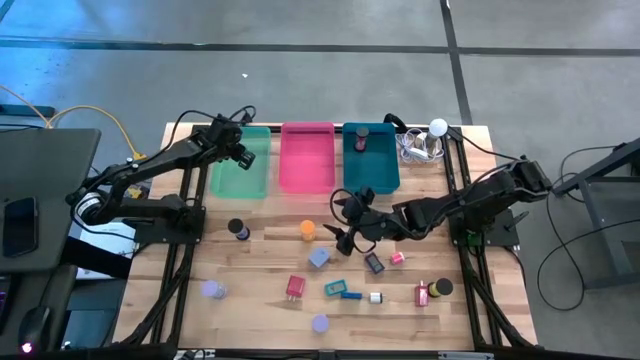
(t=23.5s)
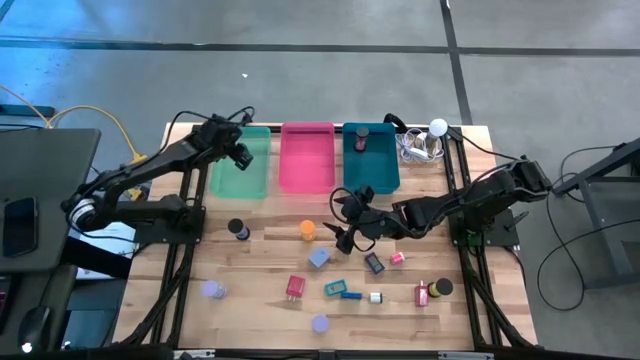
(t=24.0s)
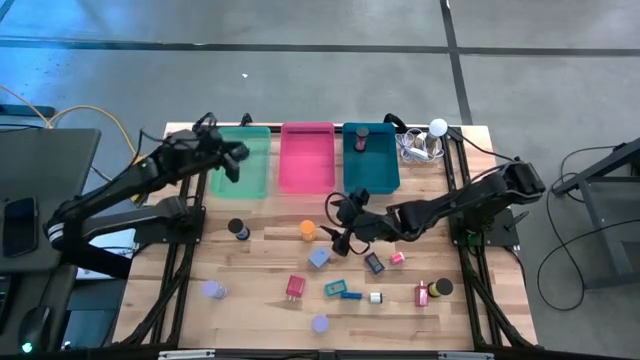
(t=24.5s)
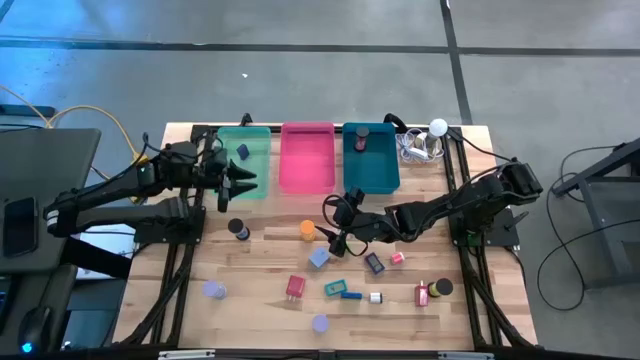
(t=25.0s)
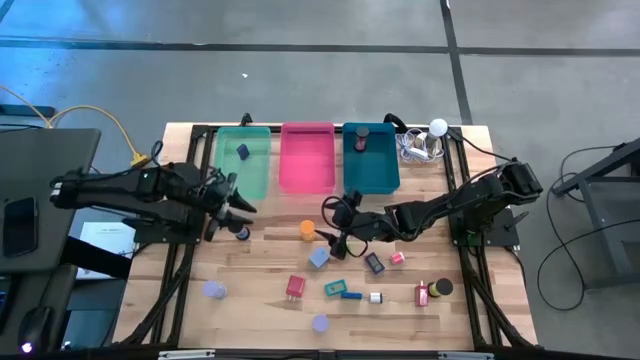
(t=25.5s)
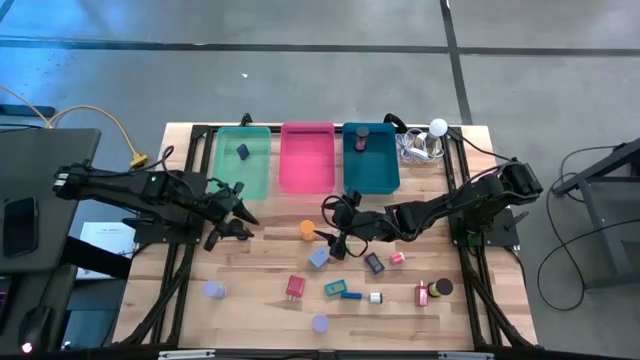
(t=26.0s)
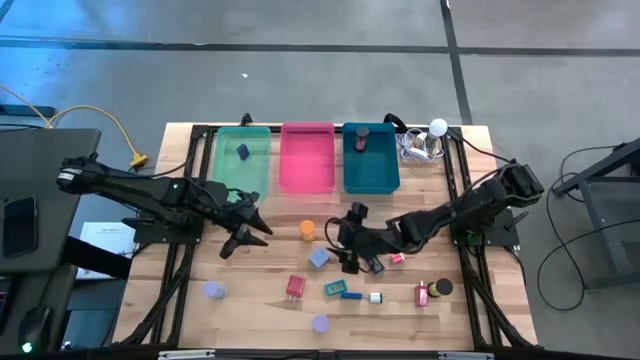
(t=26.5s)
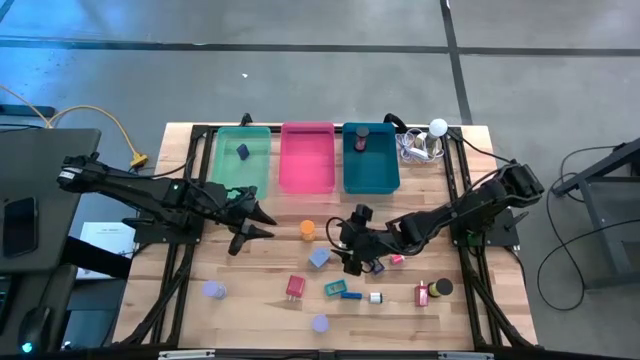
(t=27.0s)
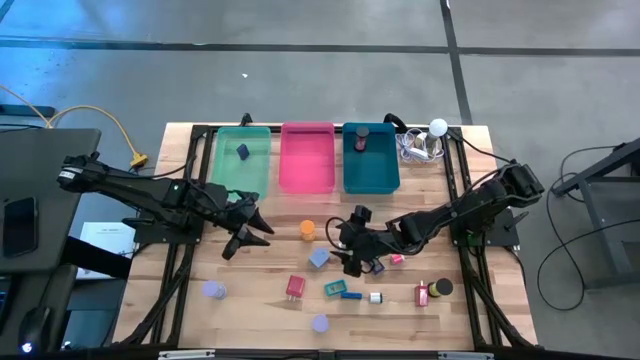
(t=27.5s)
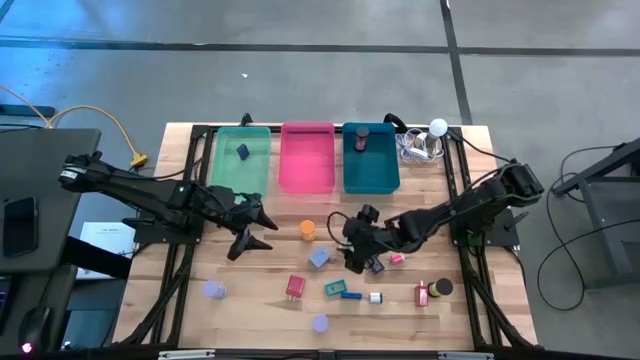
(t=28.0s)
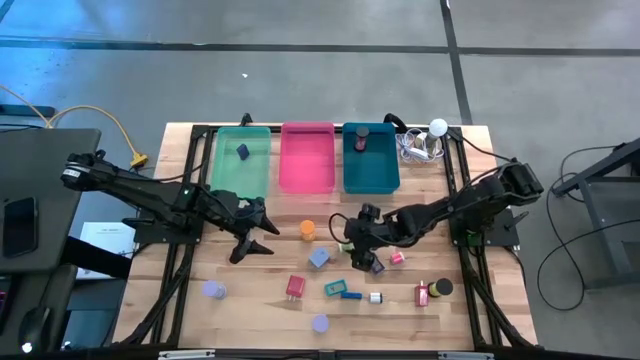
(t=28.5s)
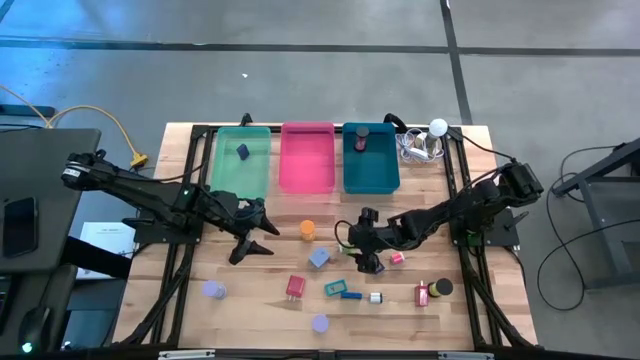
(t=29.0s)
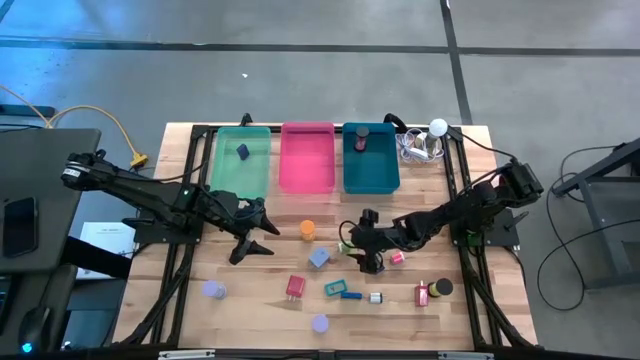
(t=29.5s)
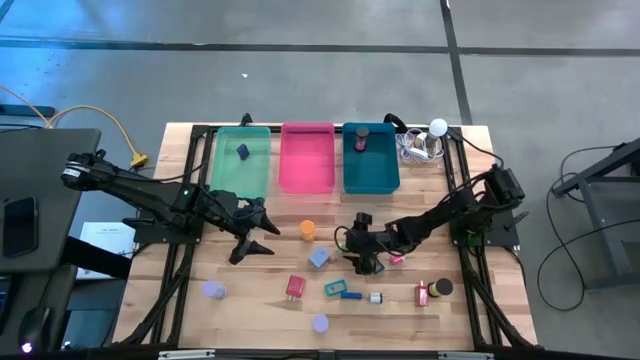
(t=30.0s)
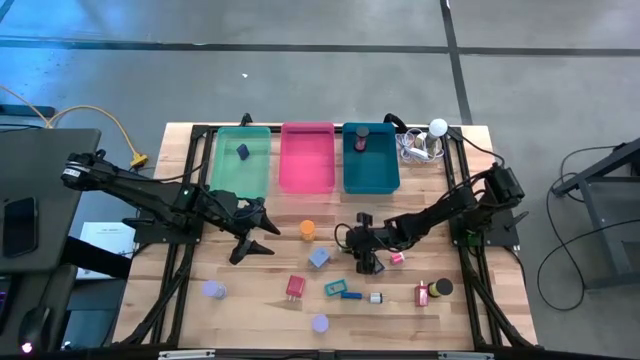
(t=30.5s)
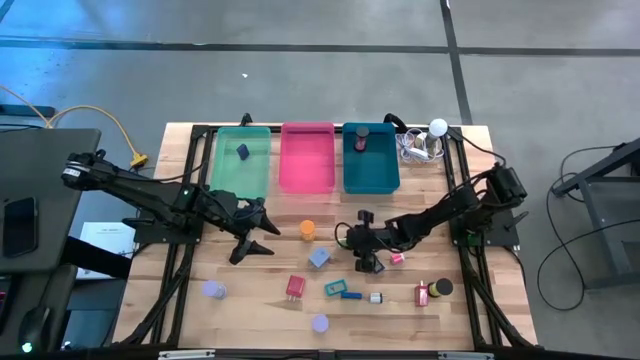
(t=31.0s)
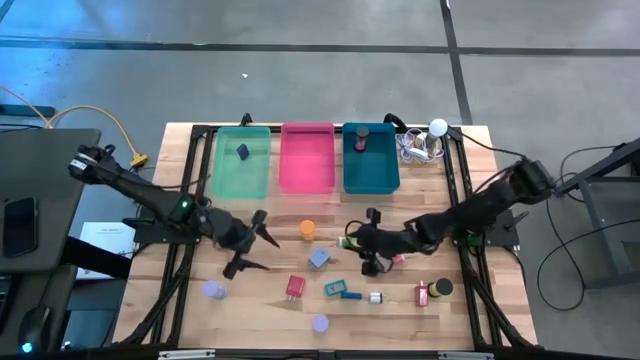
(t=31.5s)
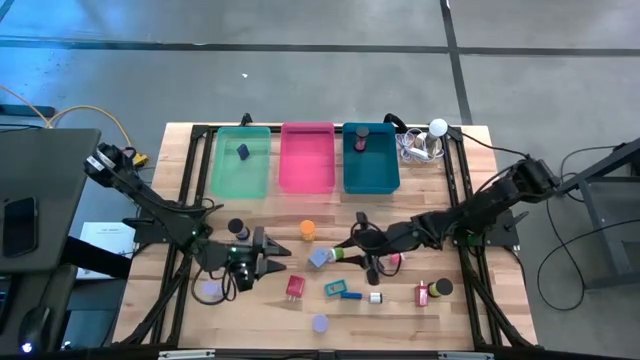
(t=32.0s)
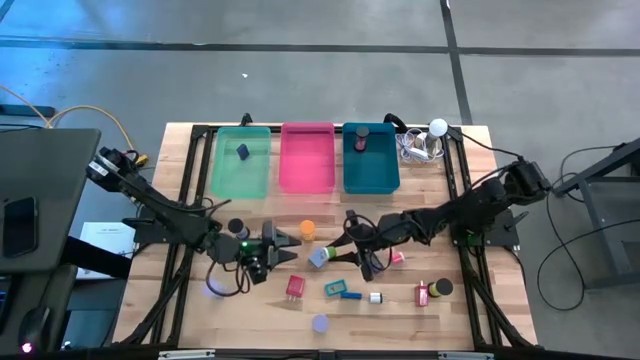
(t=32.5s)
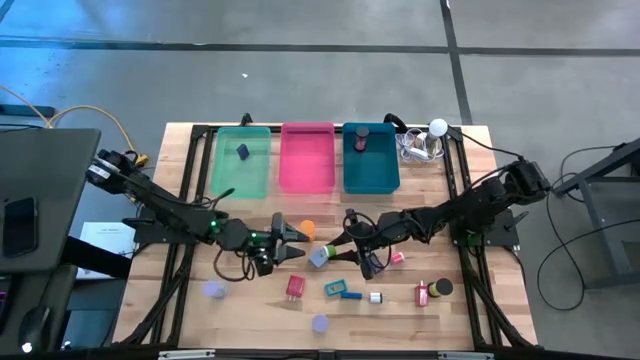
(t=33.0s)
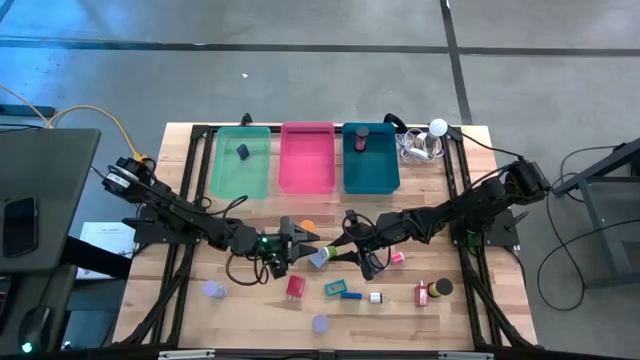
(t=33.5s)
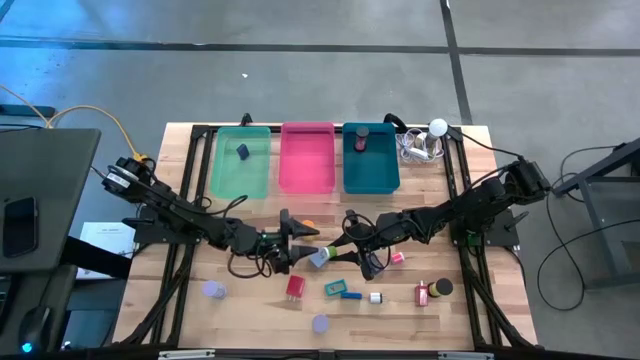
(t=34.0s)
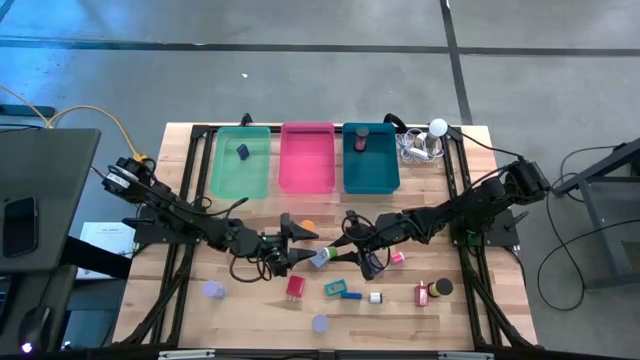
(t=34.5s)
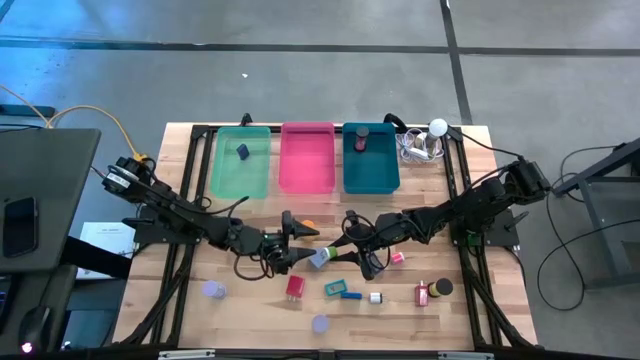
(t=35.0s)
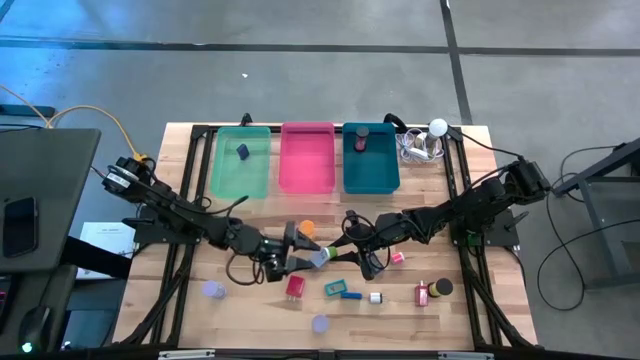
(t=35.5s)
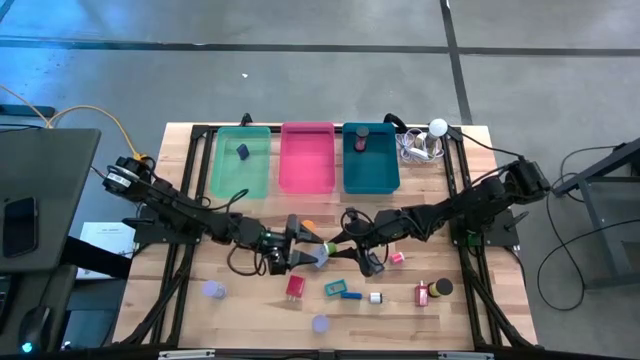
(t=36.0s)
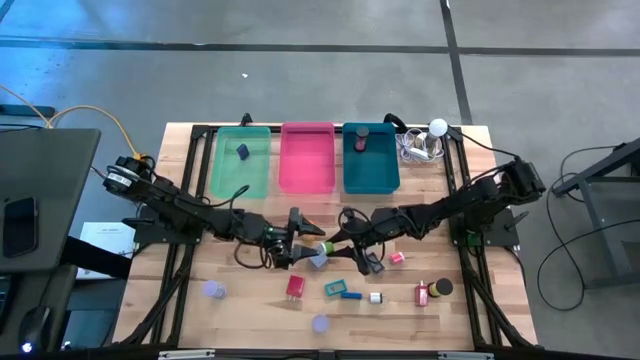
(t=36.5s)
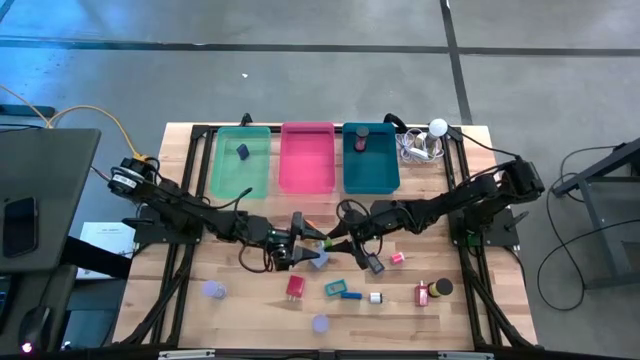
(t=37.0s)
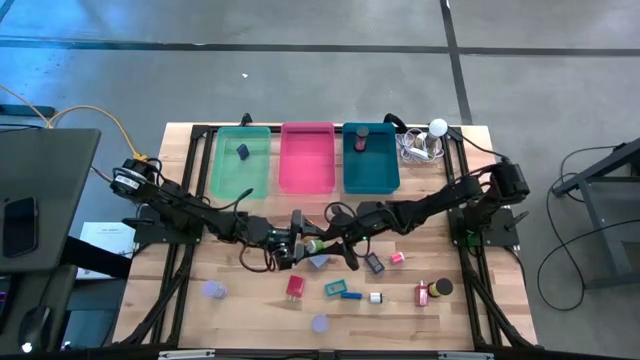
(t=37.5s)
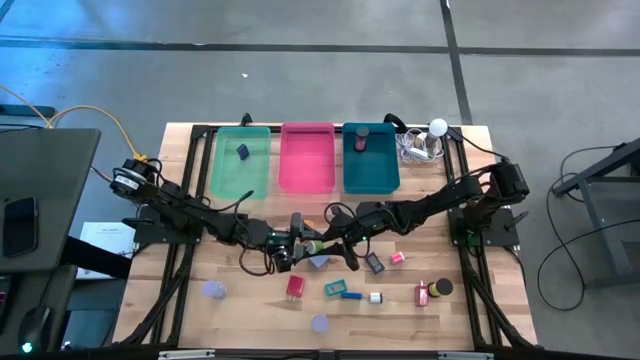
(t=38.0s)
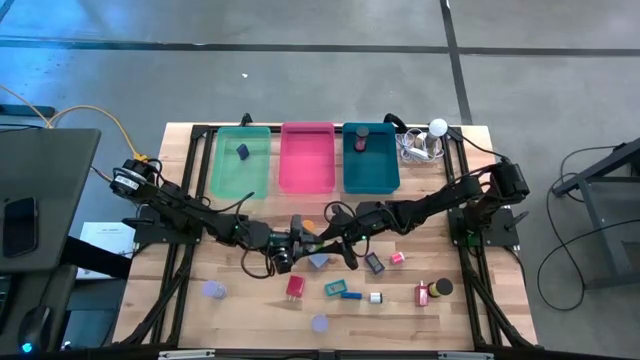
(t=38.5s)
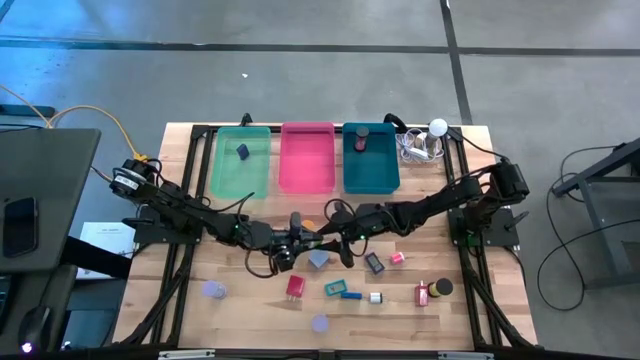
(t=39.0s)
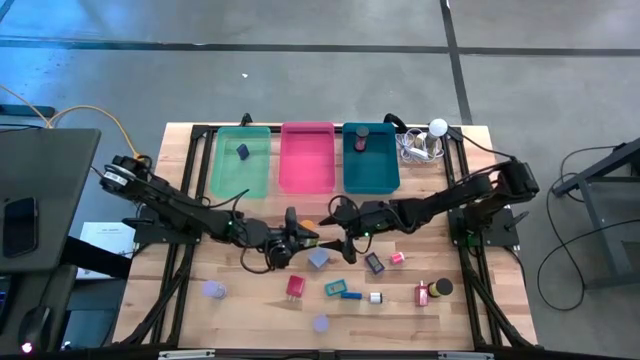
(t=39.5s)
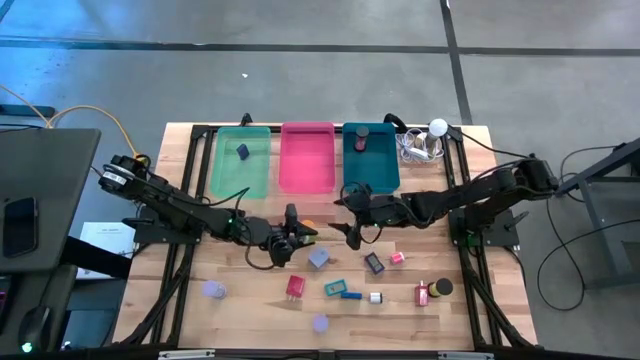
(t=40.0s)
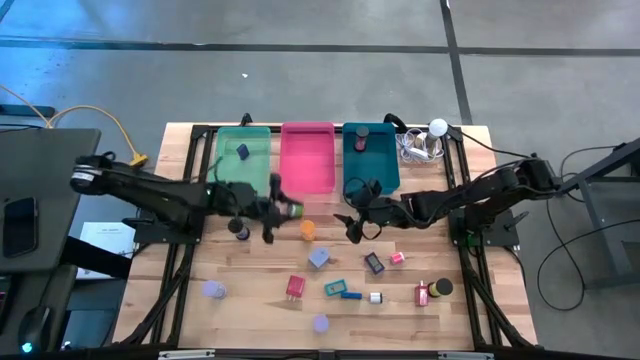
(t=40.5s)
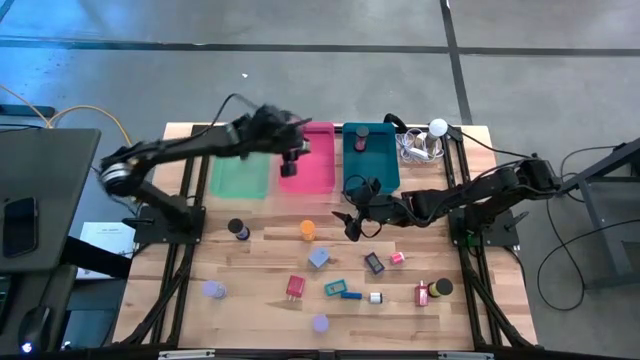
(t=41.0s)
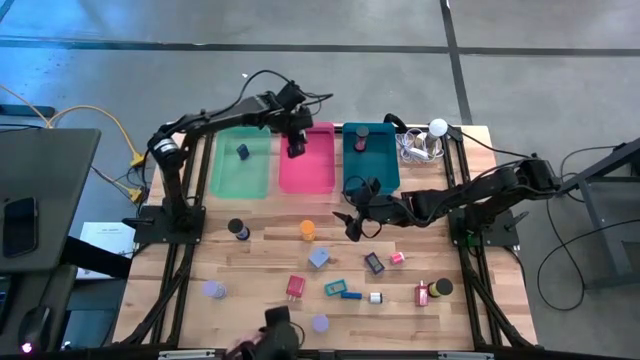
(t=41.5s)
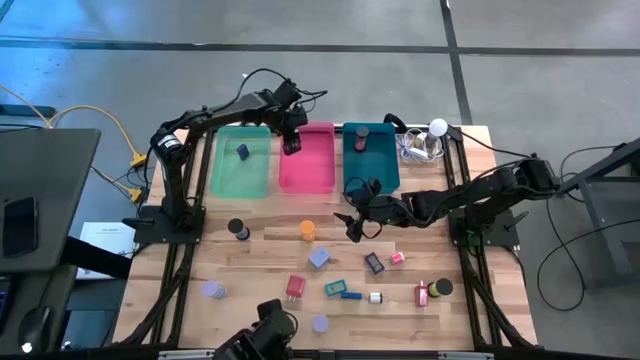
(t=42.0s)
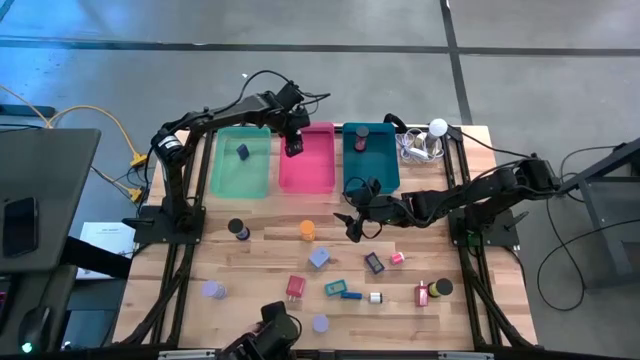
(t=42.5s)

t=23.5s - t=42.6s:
Task: Pick & Place Office items
Put the green adapter into the red bin
